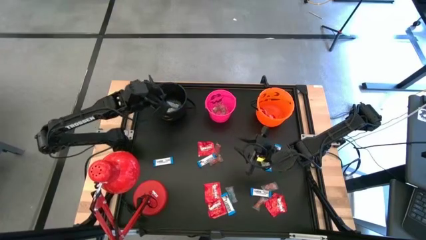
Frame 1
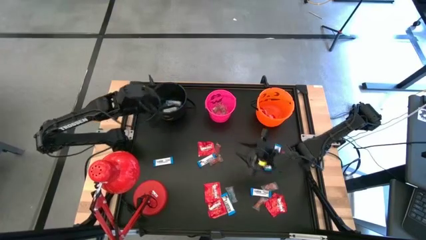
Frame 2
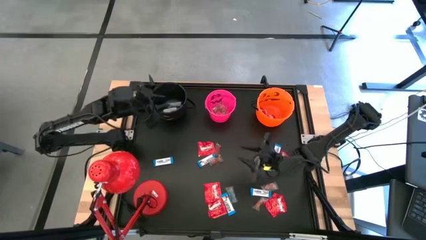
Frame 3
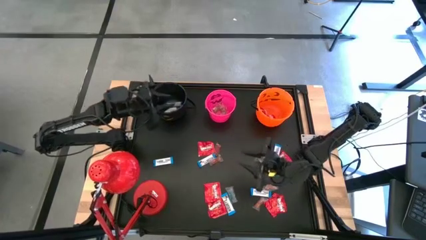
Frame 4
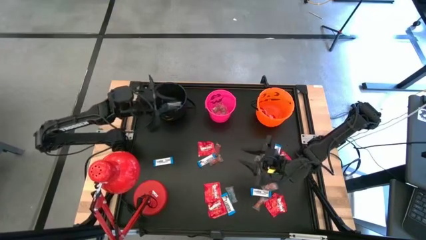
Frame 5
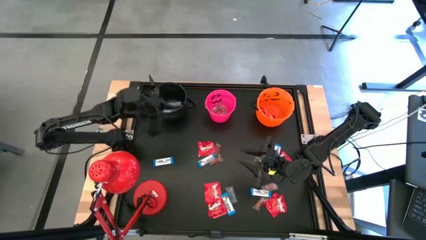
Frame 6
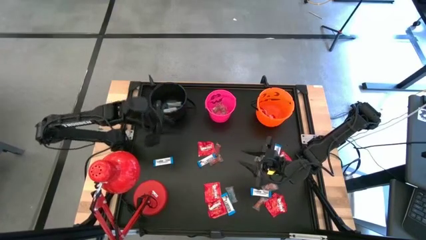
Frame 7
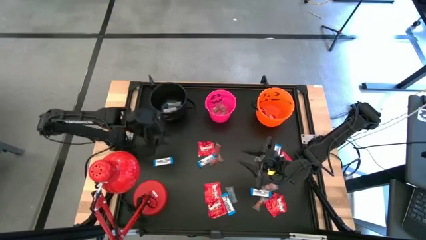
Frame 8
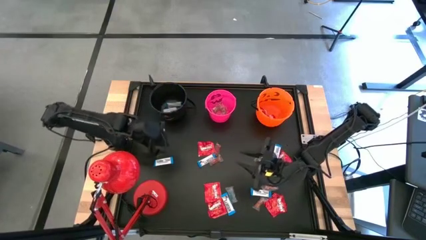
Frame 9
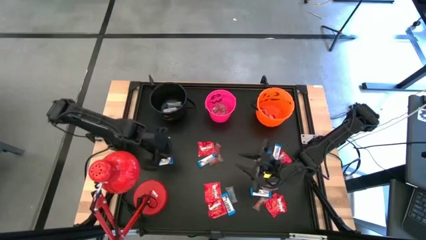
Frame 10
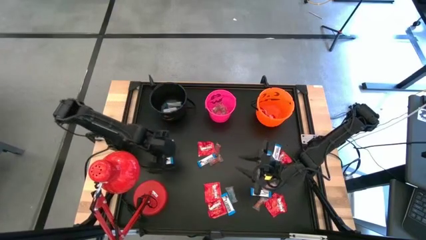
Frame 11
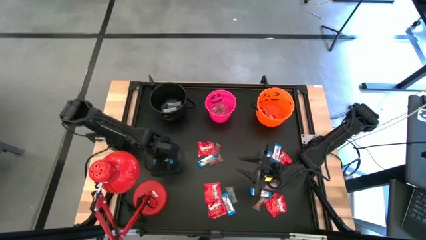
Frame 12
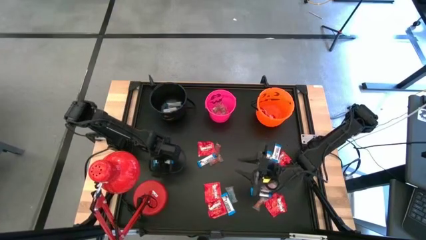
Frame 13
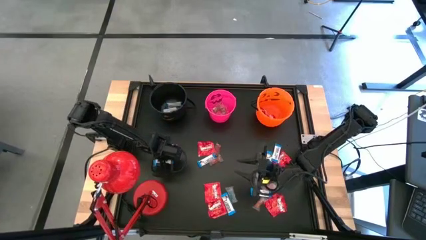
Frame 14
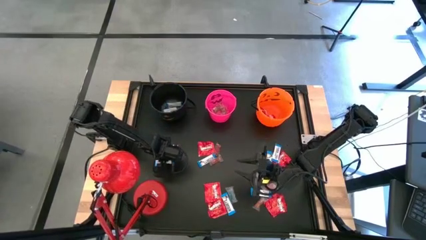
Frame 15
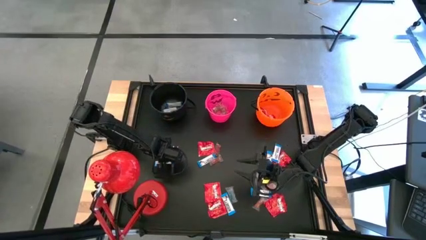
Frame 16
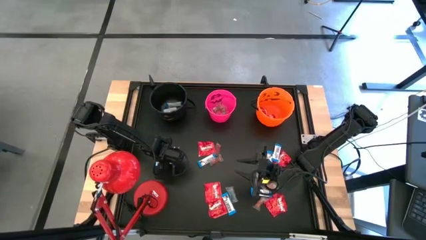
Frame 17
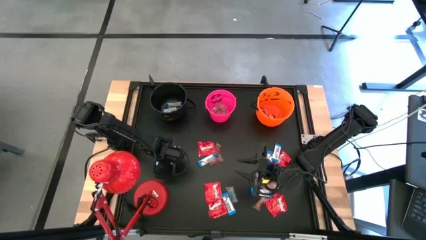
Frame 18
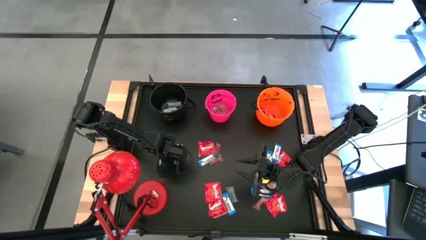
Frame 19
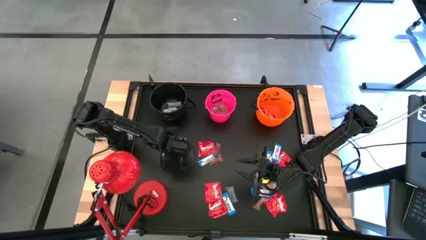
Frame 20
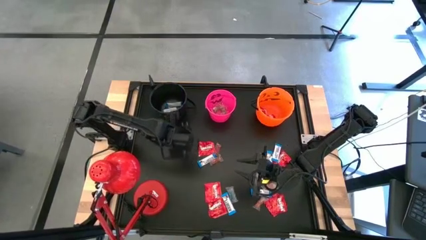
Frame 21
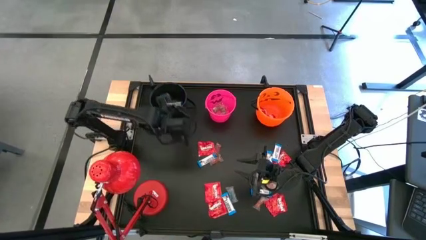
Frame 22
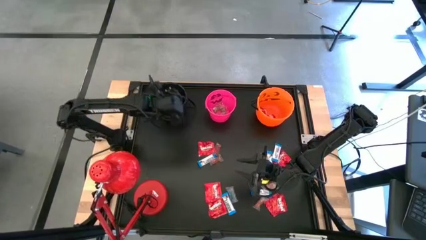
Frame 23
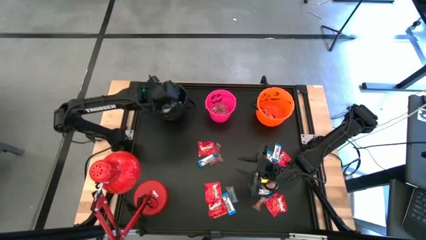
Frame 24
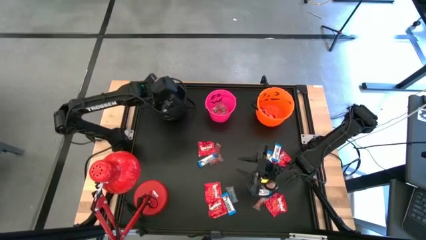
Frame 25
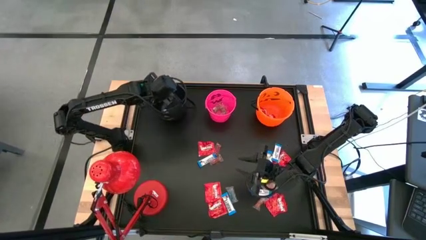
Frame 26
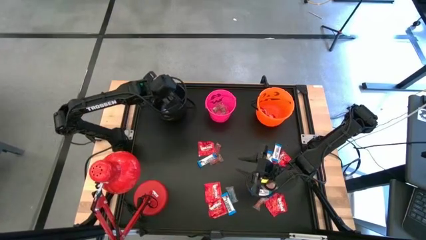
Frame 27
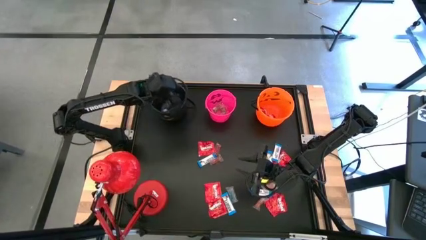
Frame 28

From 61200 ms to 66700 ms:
Task: Organize candy in baskets
Put the white chocolate bar into the black bucket

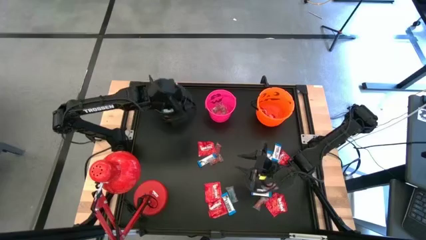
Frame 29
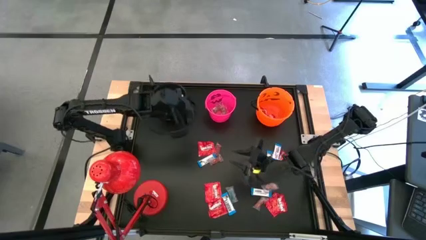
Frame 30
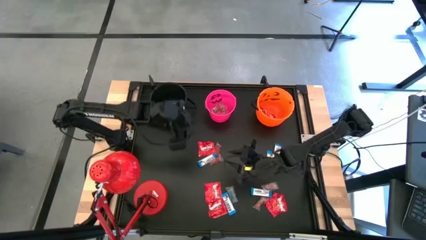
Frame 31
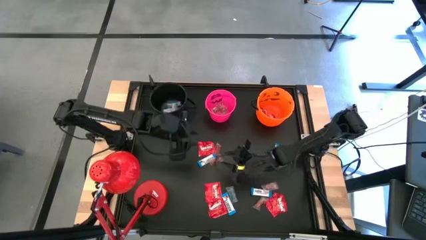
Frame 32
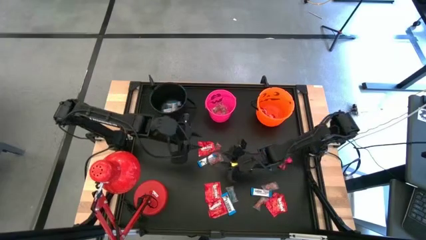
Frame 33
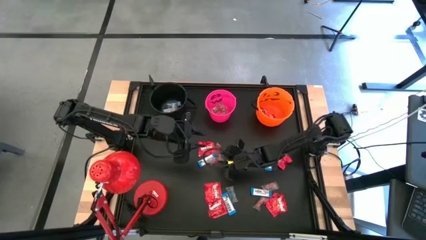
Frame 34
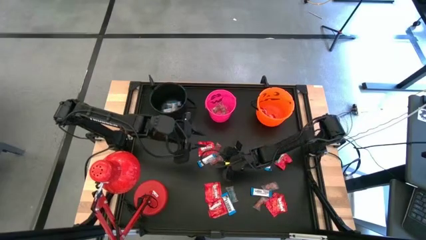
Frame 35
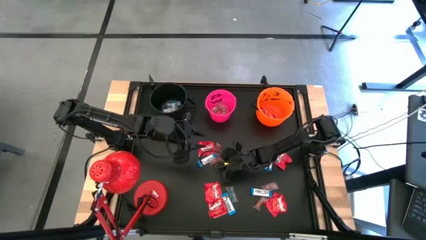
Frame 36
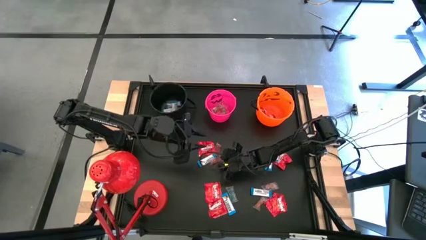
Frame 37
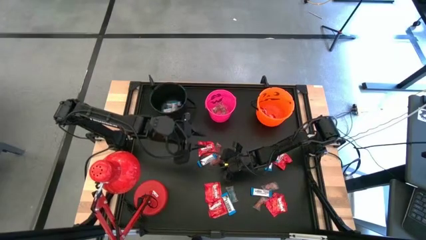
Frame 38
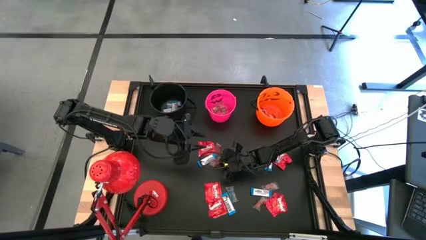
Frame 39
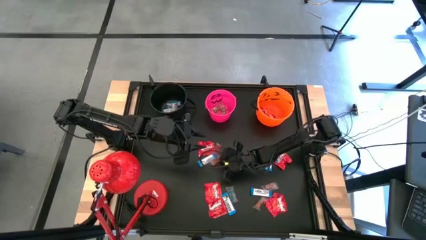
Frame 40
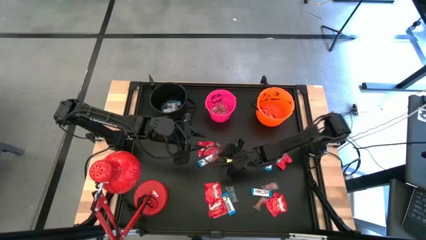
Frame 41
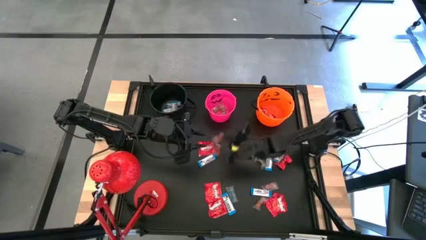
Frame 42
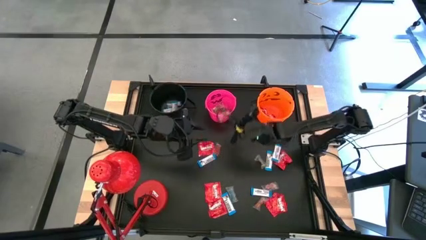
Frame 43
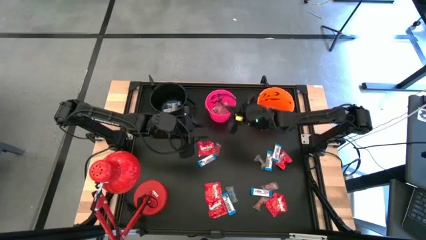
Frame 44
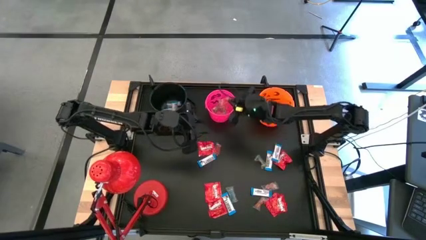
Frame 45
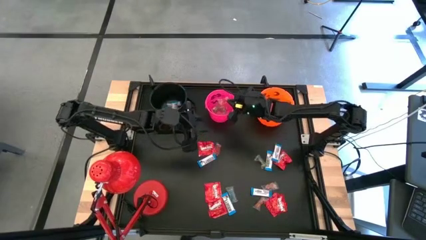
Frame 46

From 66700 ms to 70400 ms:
Put the transparent candy into the pink bucket

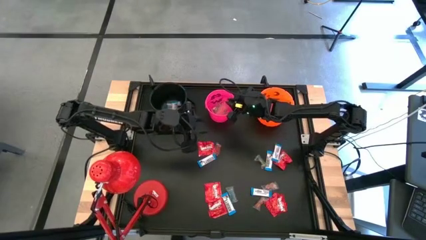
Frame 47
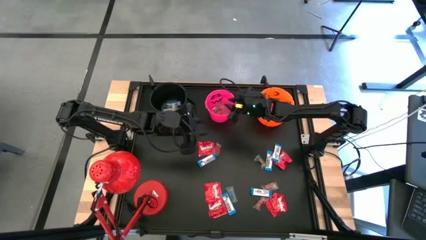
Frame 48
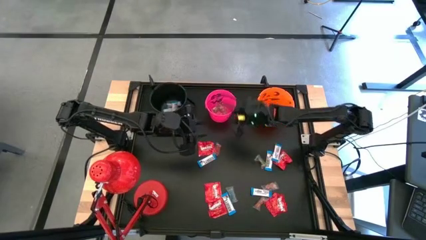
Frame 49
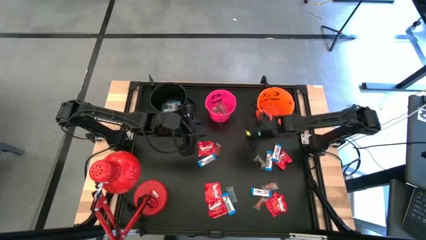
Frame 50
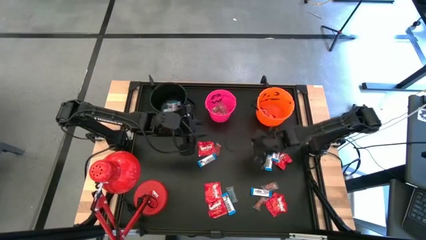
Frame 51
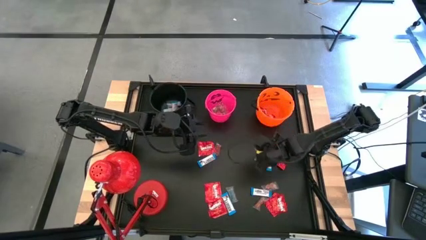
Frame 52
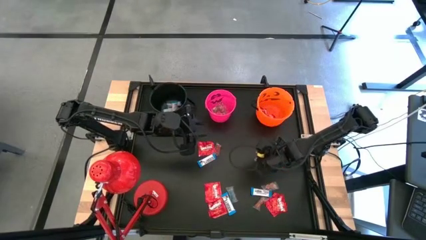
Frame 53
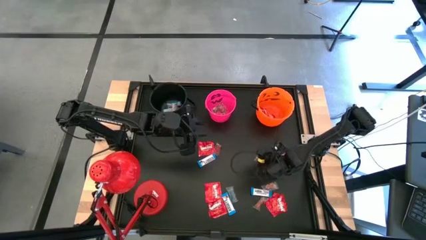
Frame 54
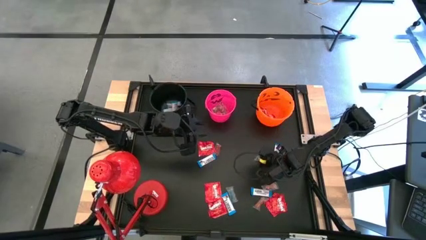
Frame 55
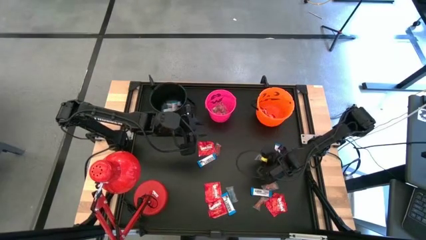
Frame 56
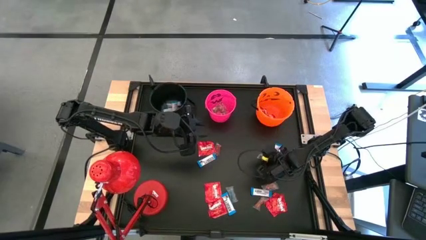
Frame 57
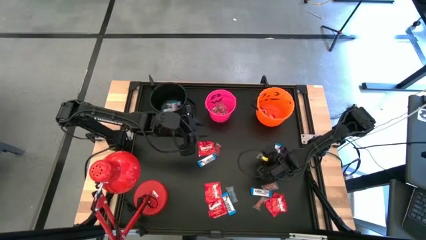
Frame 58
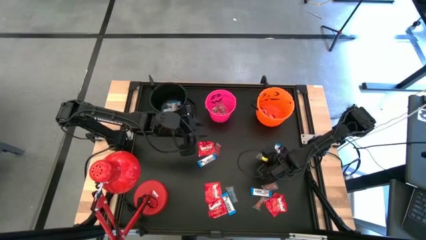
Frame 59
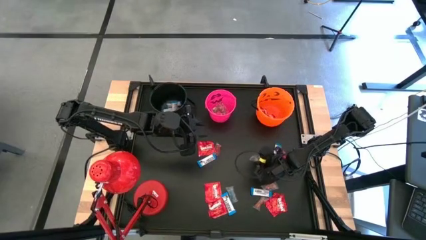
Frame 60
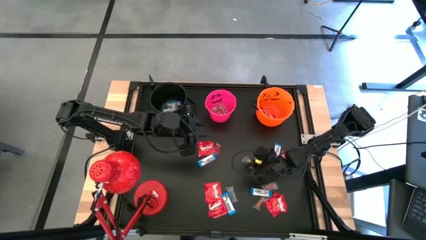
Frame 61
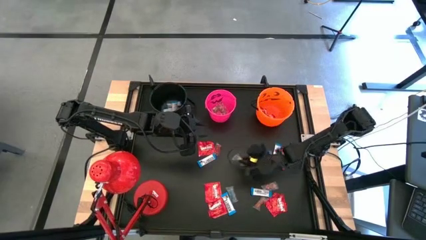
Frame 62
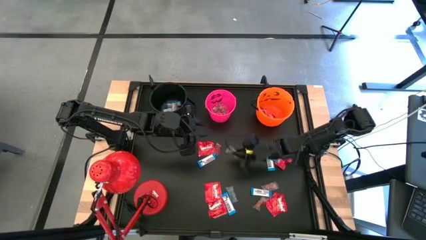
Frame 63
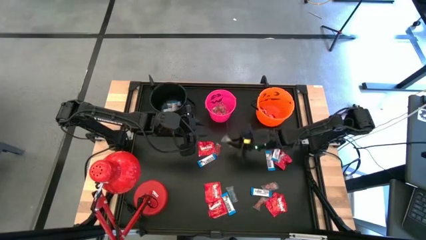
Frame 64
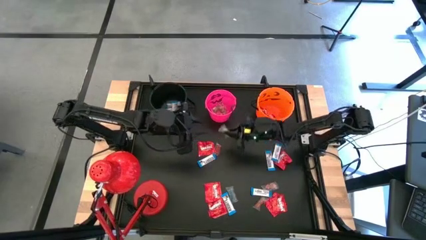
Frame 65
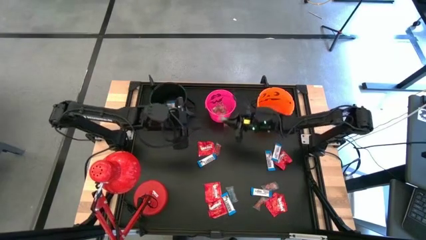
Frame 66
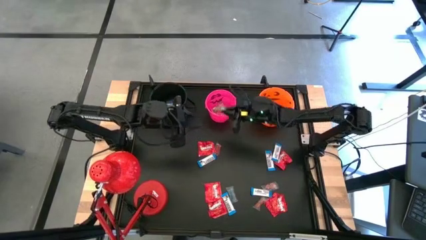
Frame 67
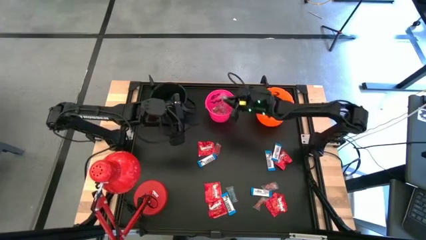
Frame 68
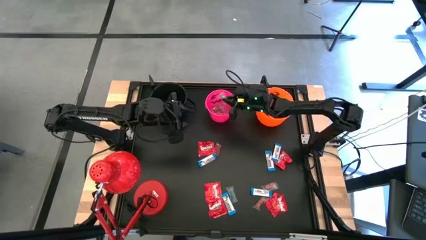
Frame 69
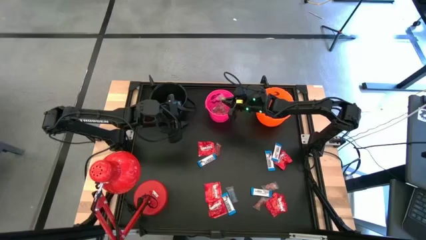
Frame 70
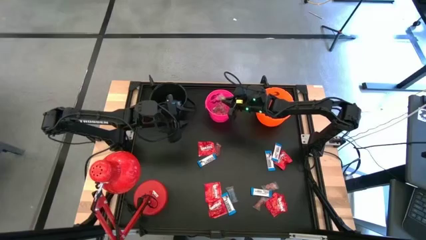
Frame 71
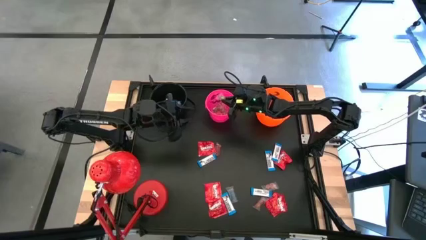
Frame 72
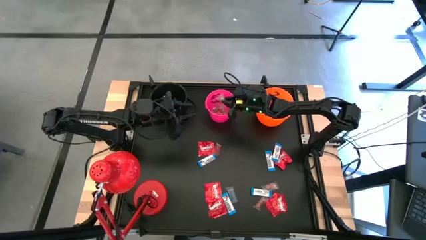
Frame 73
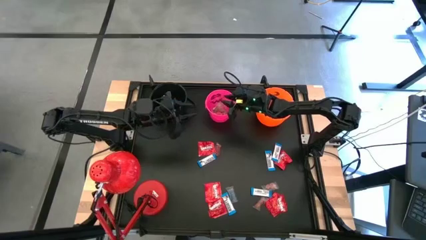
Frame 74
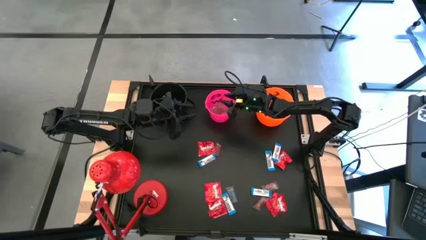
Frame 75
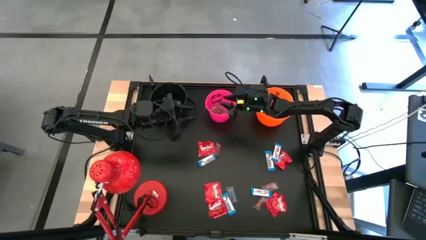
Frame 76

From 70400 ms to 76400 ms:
Put the transparent candy into the pink bucket

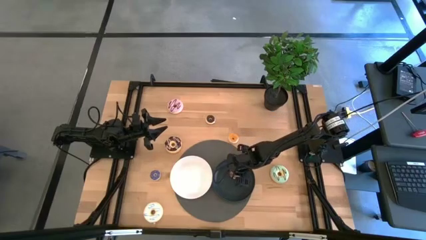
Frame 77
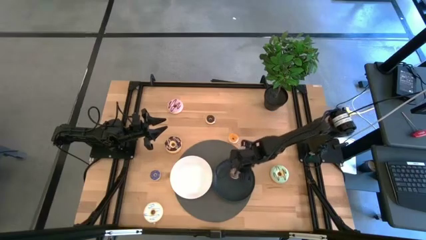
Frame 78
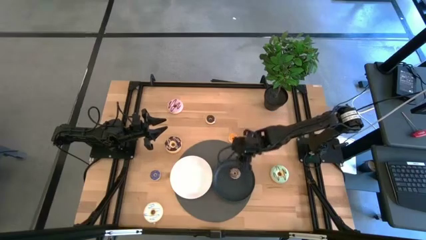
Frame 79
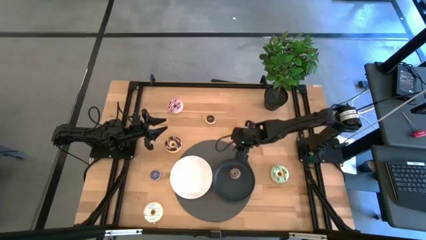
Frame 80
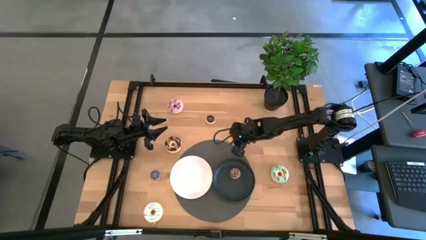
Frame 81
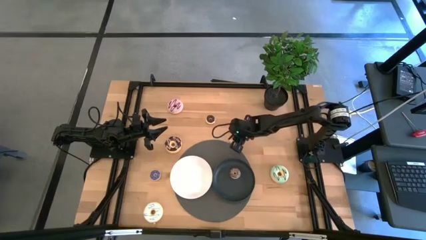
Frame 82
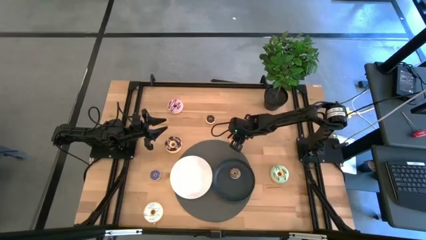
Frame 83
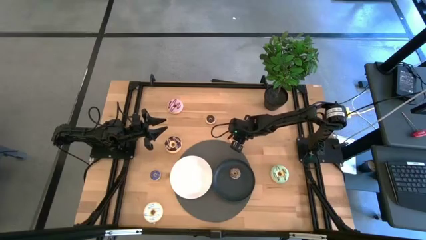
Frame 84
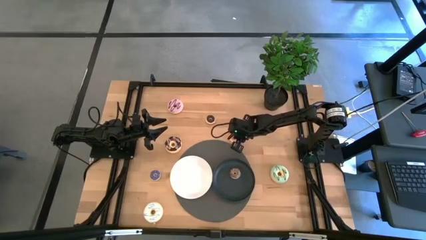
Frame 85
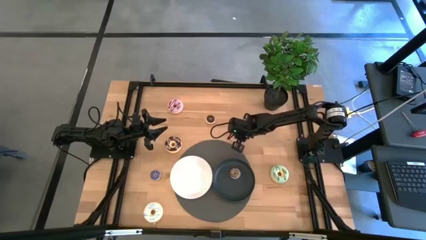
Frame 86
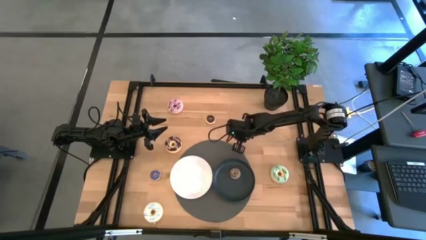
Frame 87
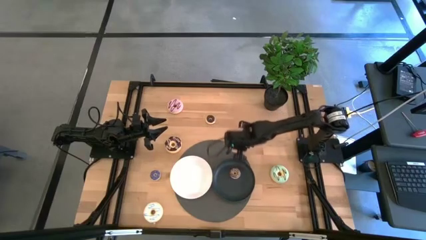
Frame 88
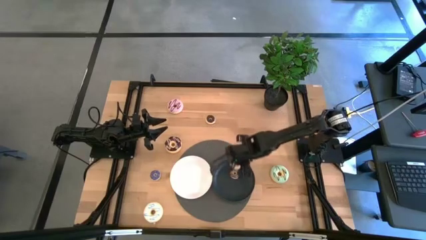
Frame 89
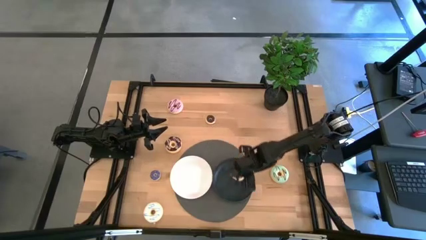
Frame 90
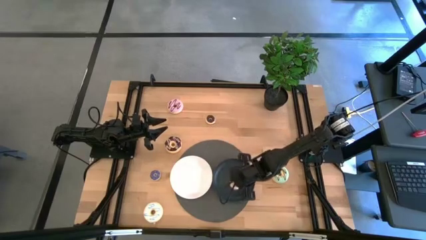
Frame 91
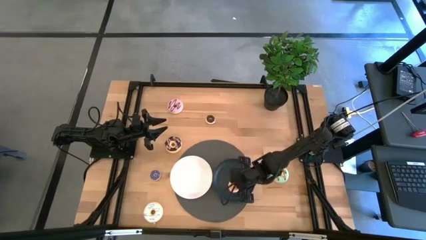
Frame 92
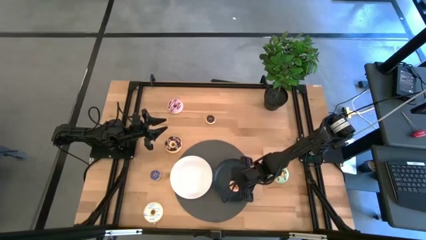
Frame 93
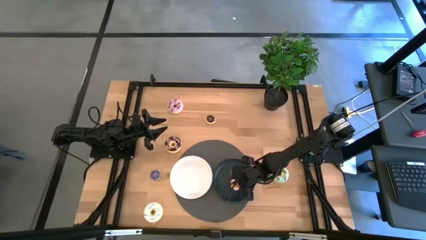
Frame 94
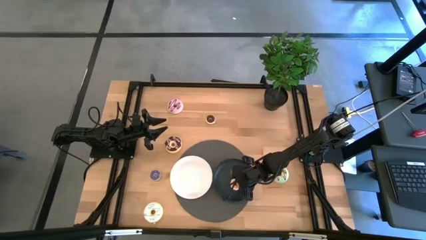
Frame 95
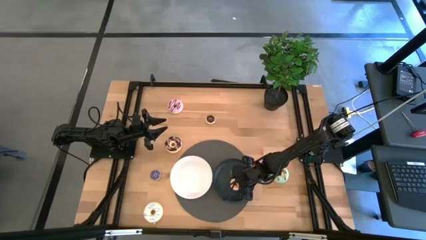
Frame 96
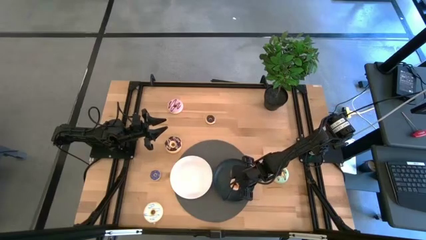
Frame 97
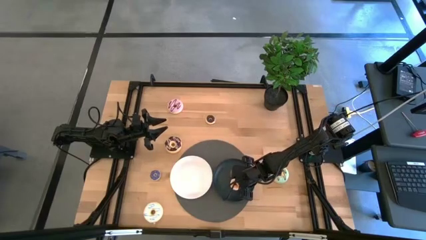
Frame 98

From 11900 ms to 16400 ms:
Task: Pick & Place donuts
Put the small yellow donut on the black plate
